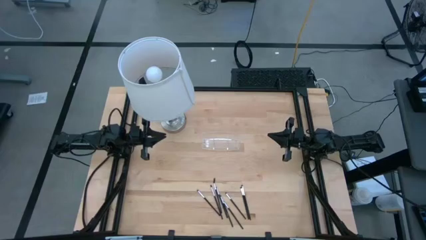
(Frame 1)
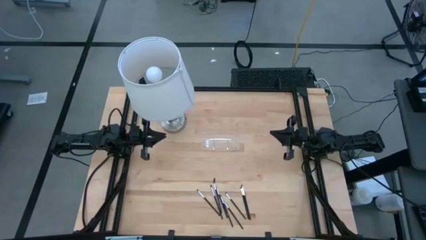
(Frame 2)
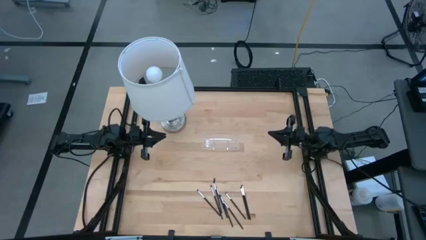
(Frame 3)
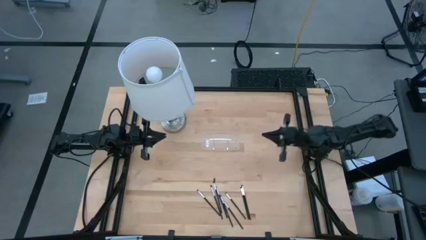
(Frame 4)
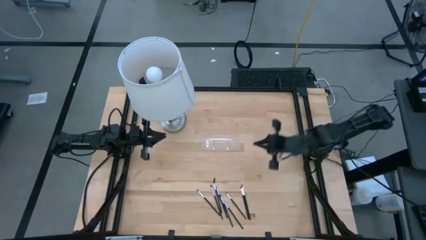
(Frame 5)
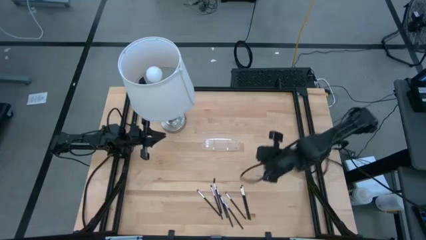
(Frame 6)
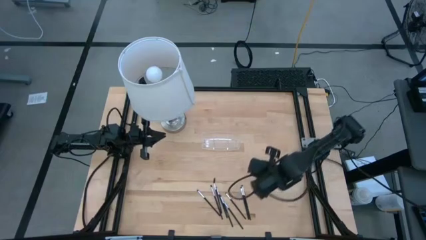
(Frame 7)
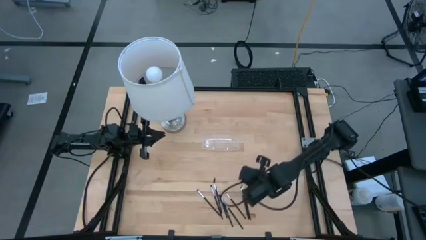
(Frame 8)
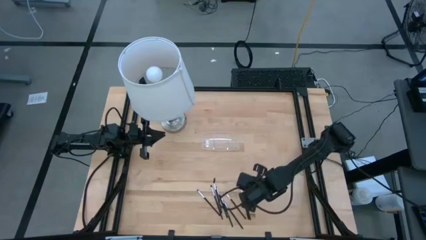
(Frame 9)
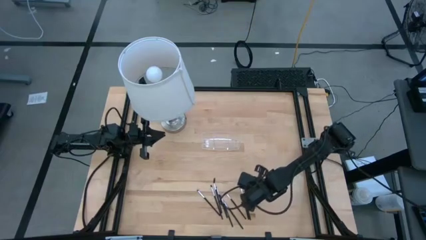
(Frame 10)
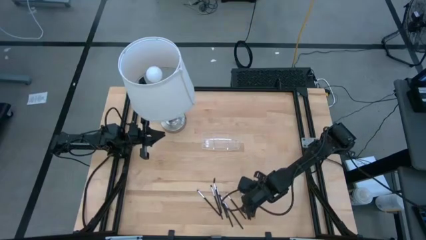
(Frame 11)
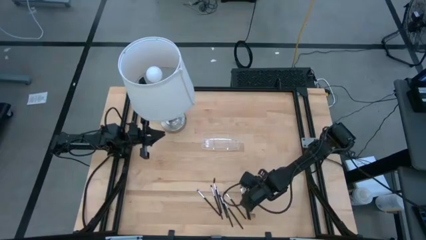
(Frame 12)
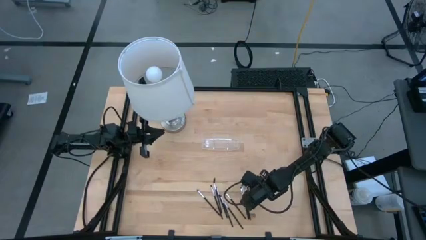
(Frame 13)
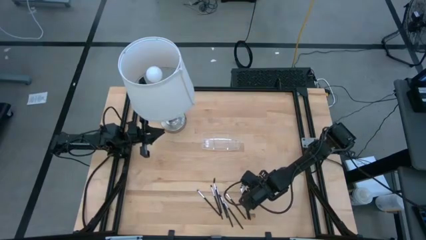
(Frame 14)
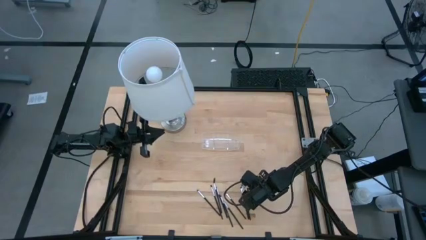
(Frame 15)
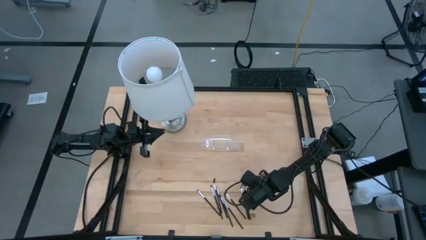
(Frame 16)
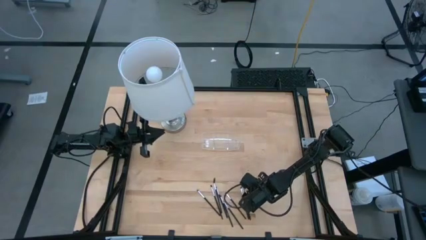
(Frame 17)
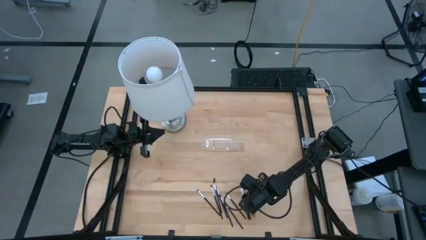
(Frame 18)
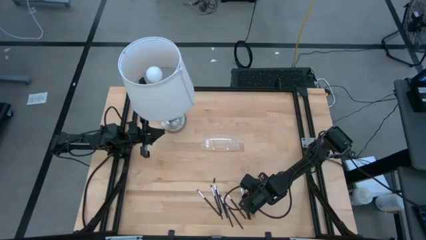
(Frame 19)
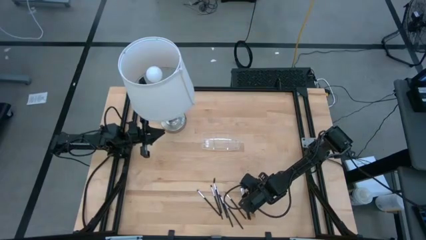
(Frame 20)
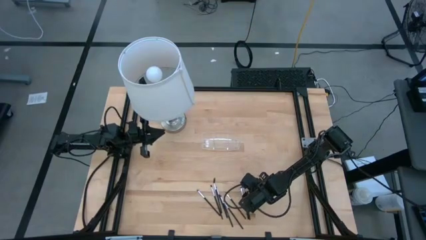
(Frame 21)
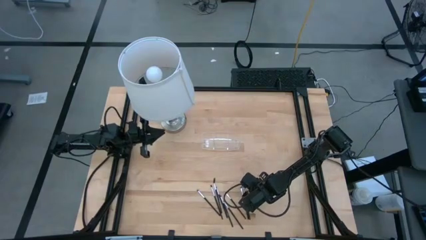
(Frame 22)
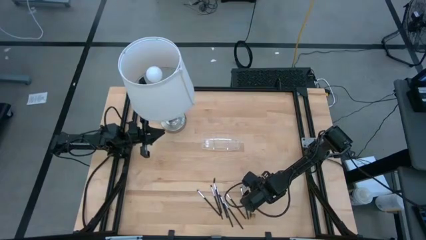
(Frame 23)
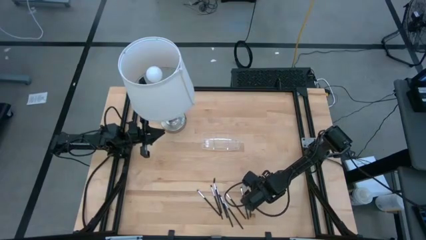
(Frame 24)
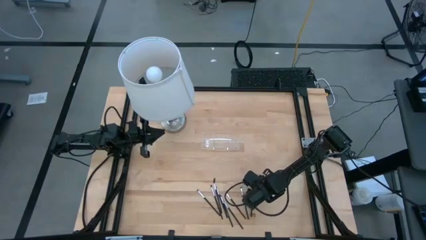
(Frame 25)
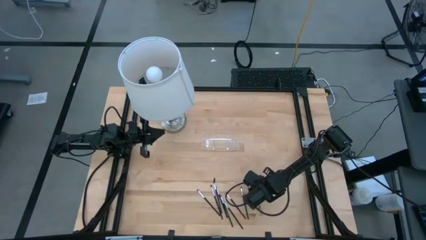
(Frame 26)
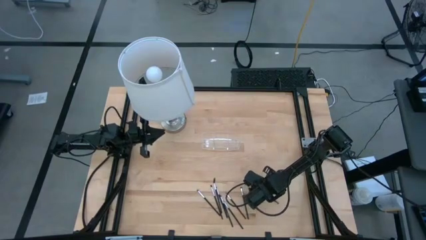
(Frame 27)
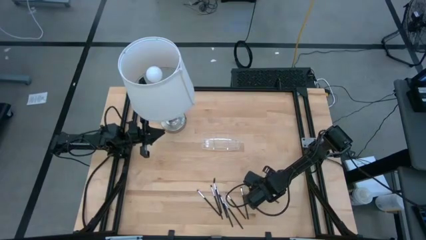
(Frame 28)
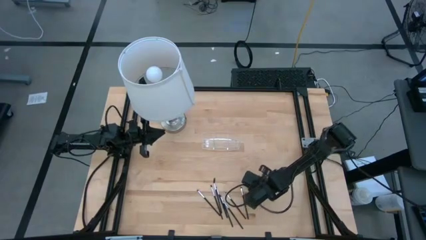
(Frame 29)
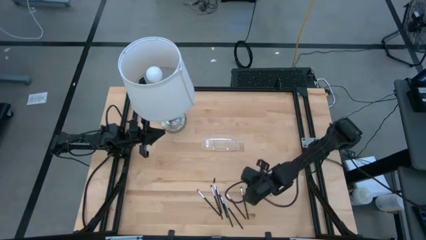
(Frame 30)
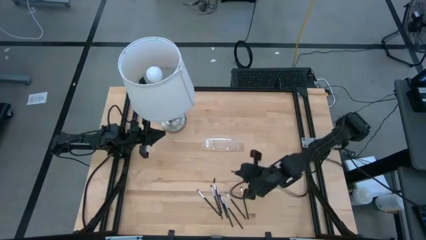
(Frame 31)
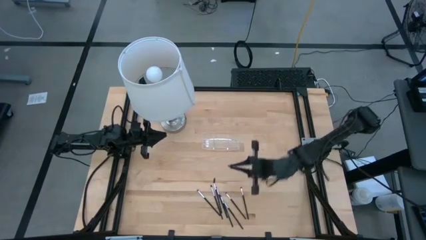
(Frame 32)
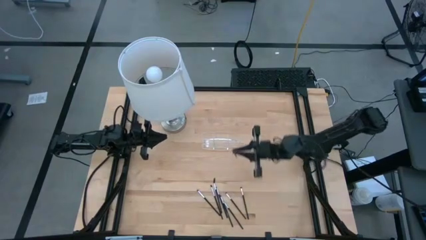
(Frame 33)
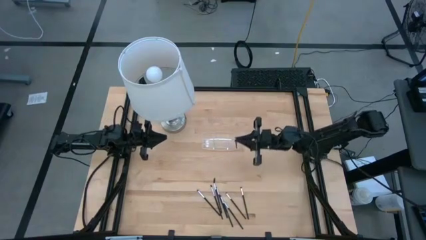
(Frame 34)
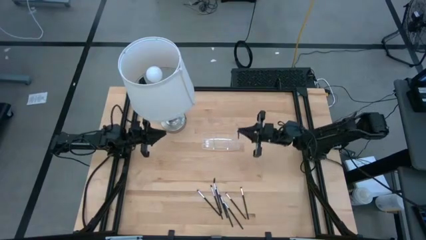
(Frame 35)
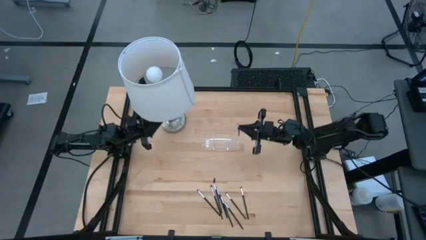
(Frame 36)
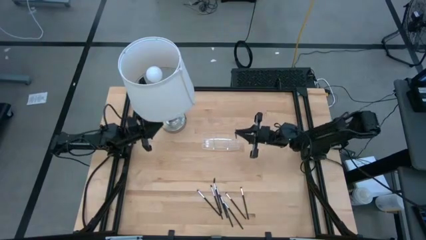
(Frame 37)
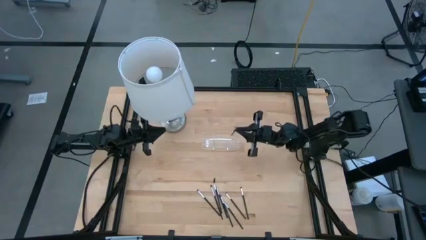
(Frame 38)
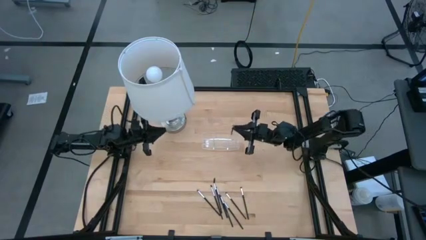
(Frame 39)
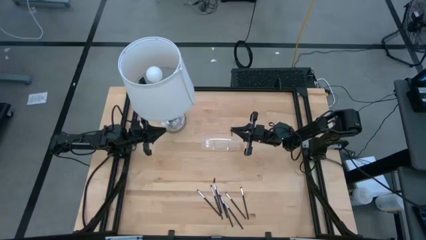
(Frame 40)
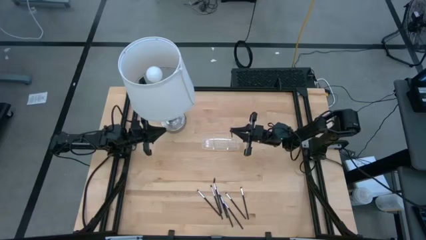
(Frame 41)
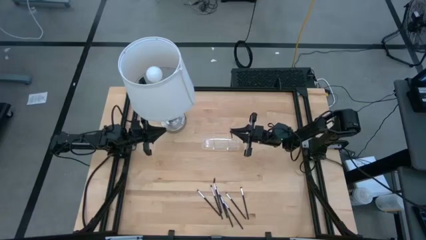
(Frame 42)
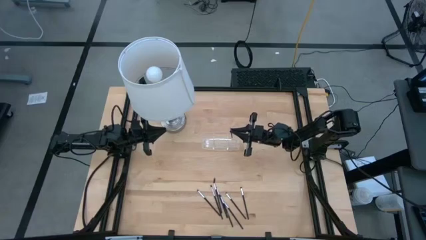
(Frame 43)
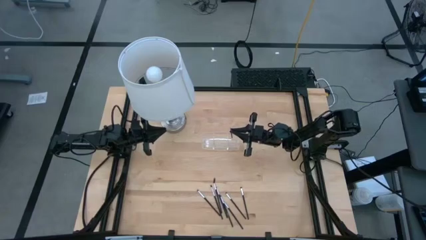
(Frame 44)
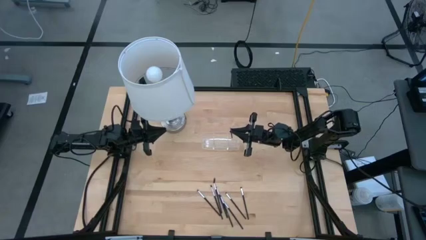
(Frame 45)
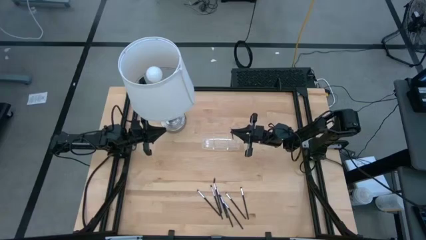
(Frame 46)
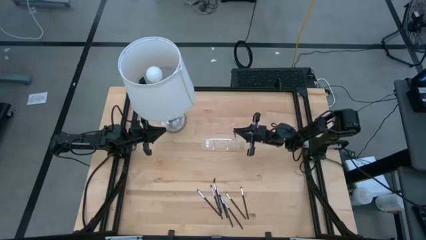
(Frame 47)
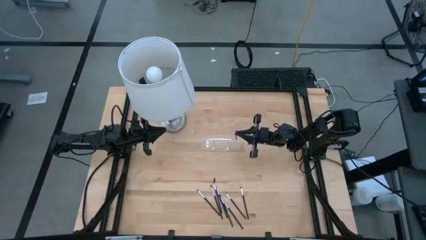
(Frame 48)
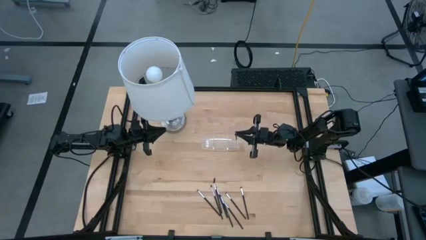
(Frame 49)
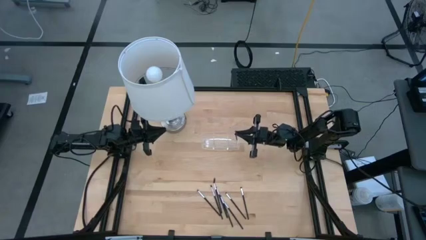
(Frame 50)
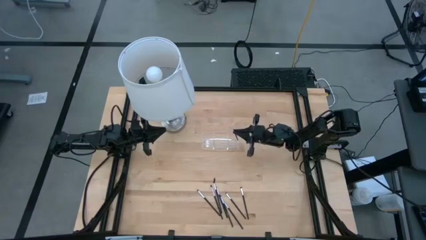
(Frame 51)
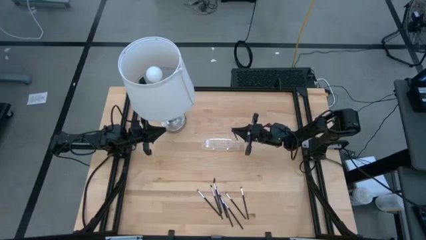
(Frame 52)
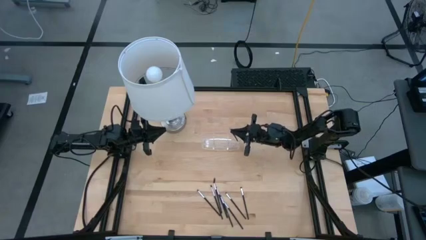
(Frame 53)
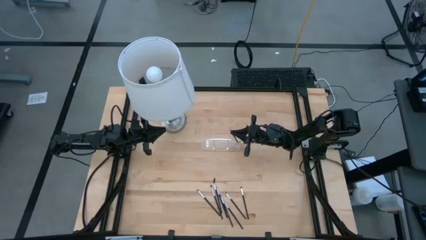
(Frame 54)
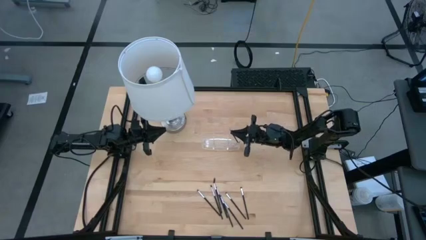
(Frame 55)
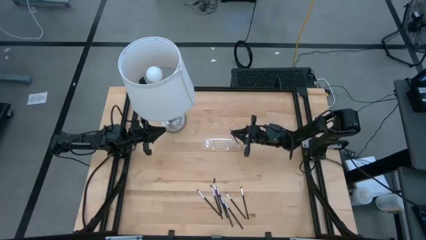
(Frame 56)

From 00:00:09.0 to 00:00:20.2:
Task: Sort items
Put the eyeshadow brush into the transparent organizer

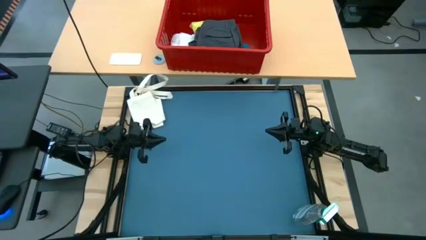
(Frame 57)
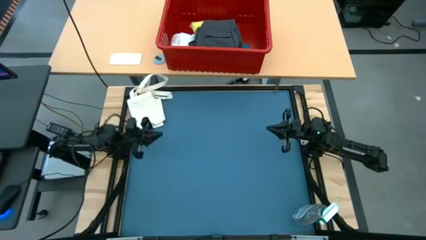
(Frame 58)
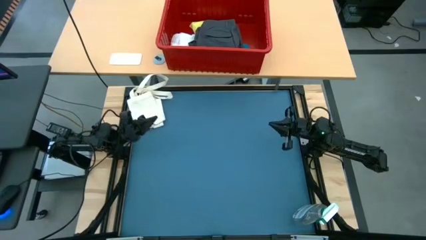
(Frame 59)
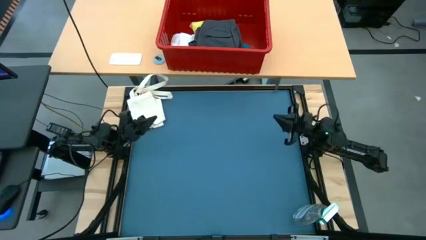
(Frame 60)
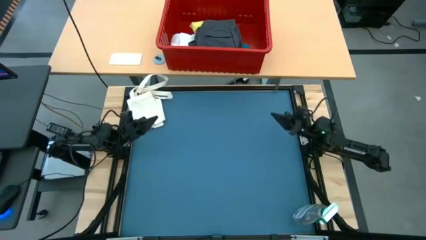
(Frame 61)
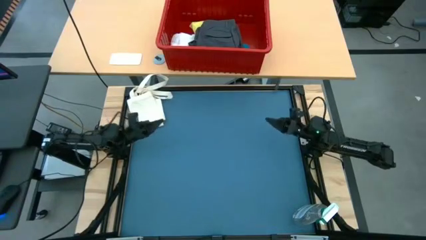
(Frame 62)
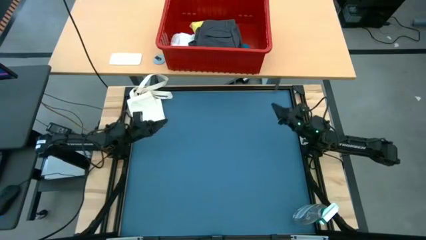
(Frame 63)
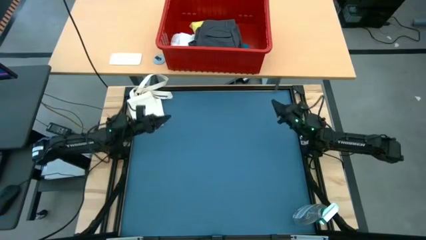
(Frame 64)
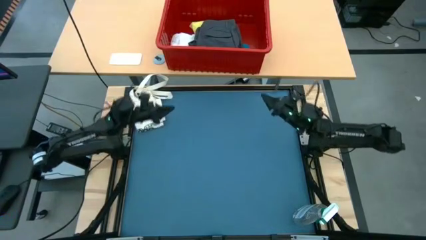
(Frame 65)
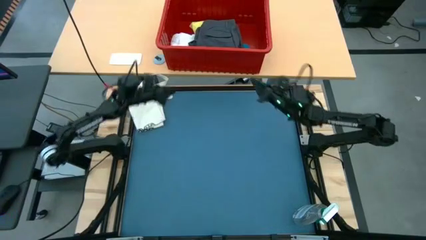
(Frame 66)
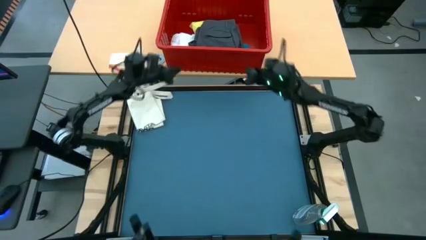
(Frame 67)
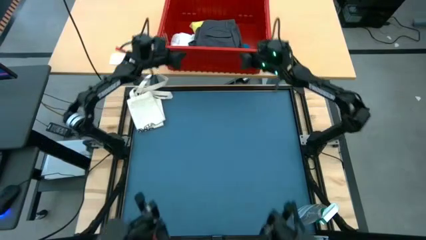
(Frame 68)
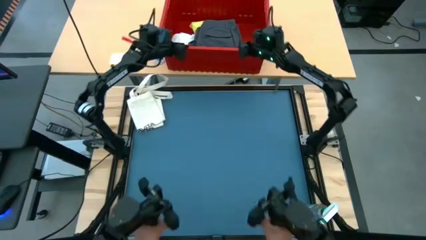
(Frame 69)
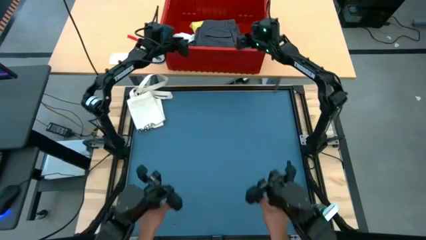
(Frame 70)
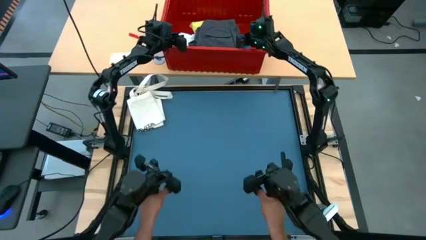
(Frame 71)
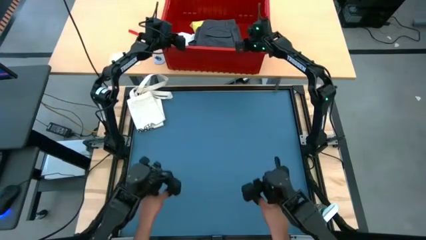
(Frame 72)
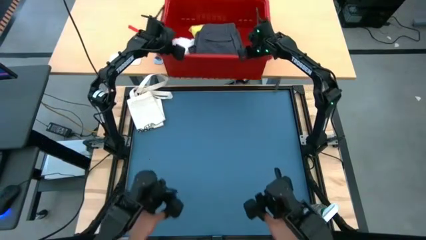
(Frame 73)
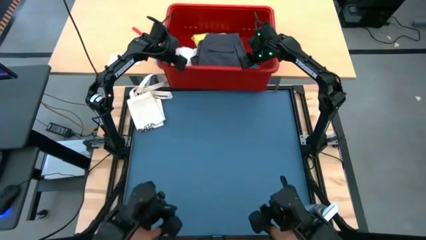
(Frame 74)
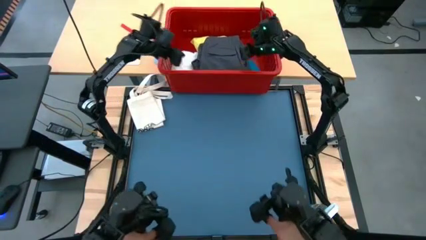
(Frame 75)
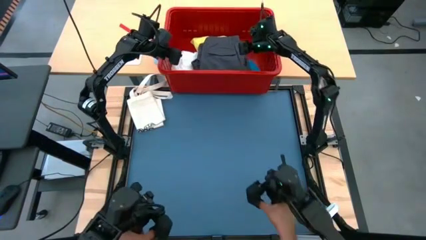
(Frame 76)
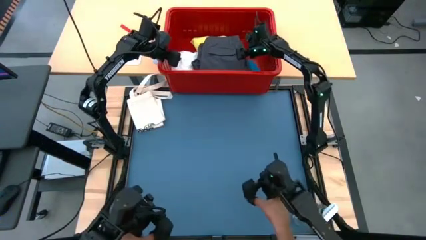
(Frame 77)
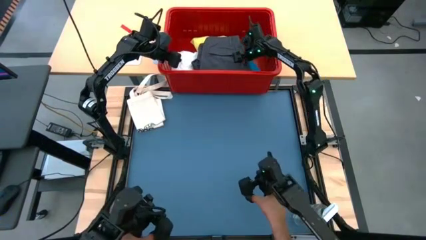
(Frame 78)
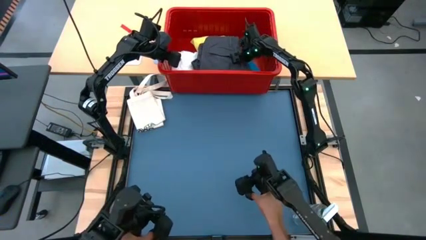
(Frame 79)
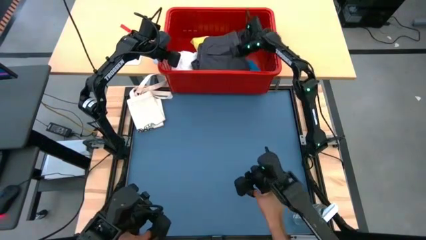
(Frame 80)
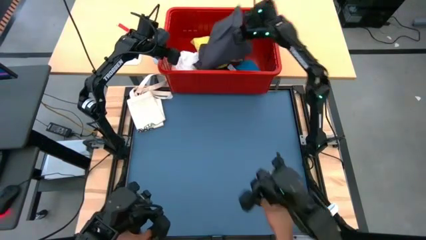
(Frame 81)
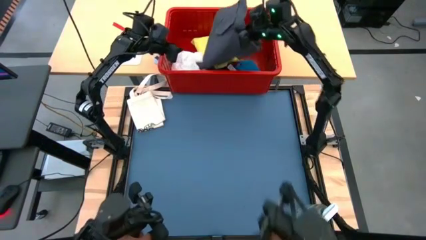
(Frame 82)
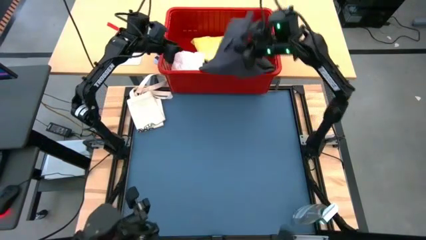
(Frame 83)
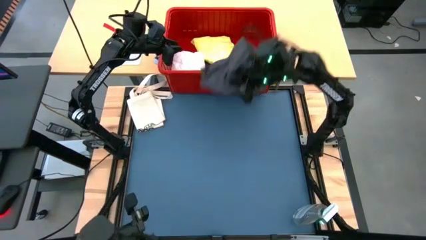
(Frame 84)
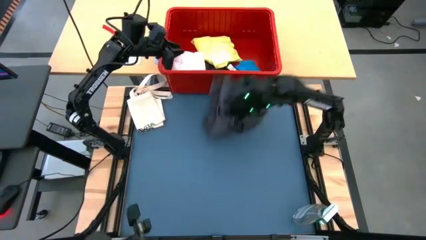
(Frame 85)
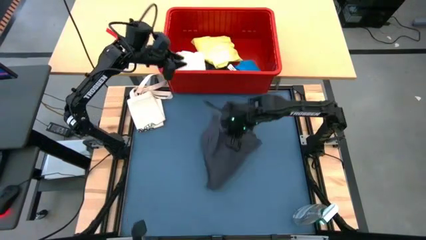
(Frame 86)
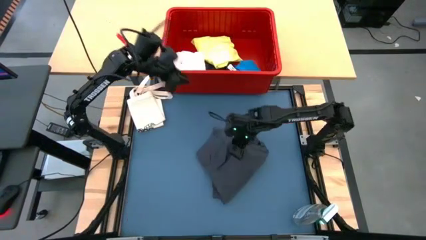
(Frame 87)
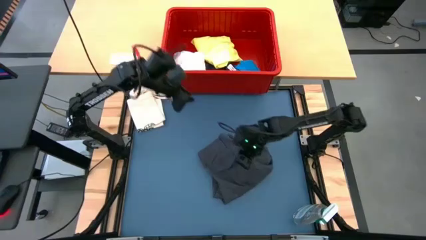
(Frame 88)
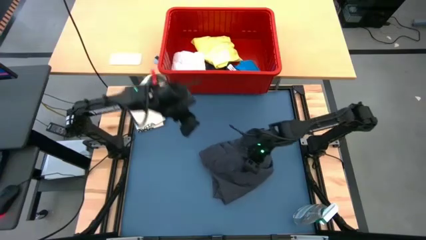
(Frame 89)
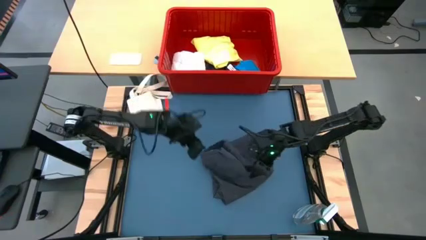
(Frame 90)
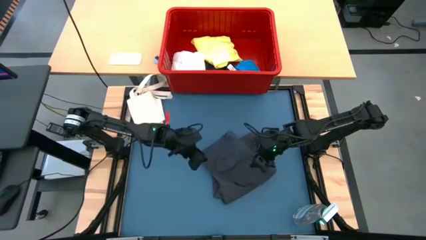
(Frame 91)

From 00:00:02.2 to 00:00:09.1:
Task: Fold laundry
Remove the gray shorts from the bin
